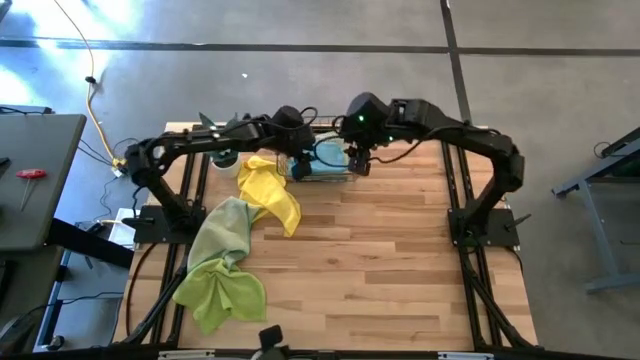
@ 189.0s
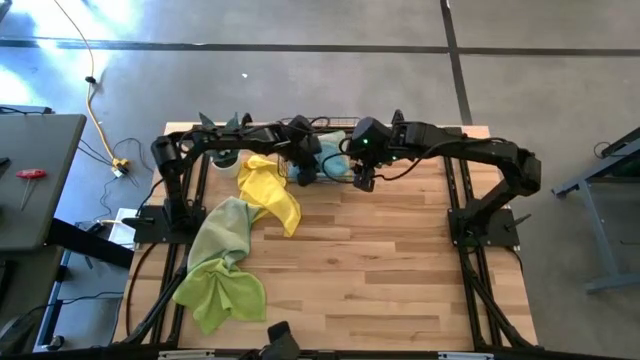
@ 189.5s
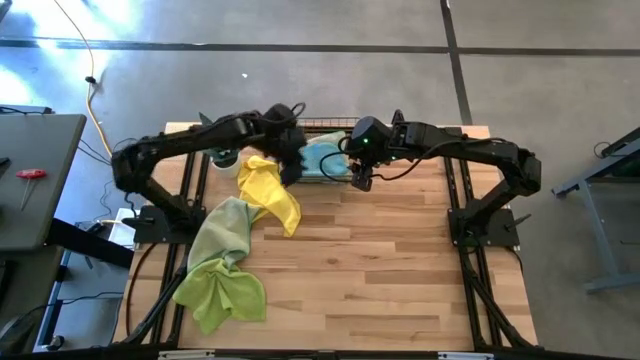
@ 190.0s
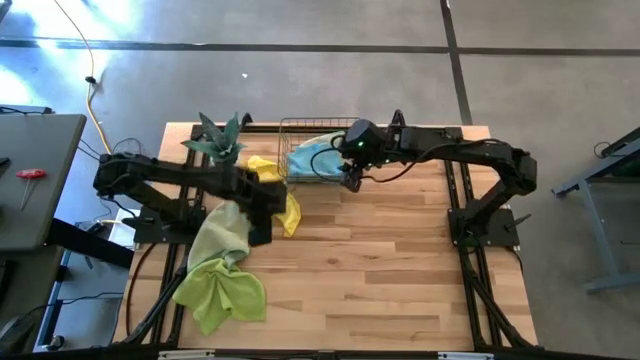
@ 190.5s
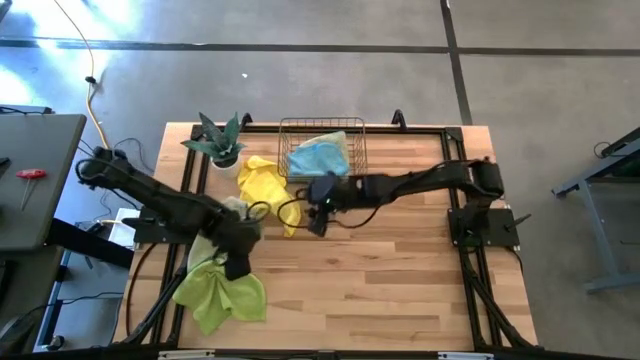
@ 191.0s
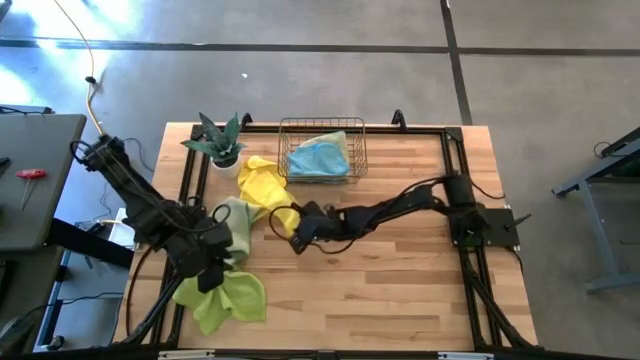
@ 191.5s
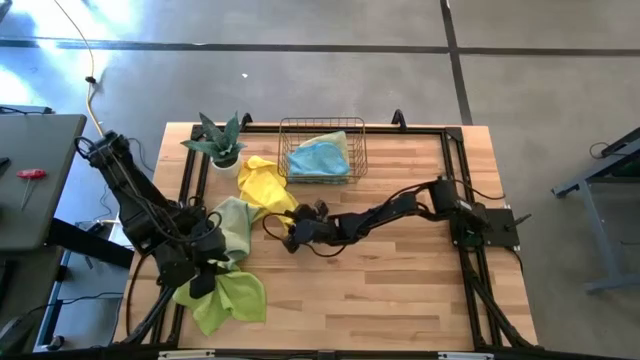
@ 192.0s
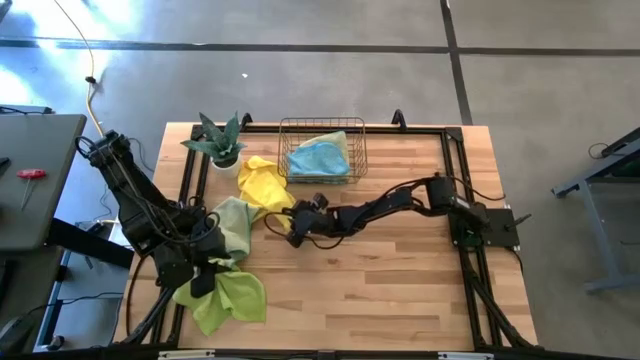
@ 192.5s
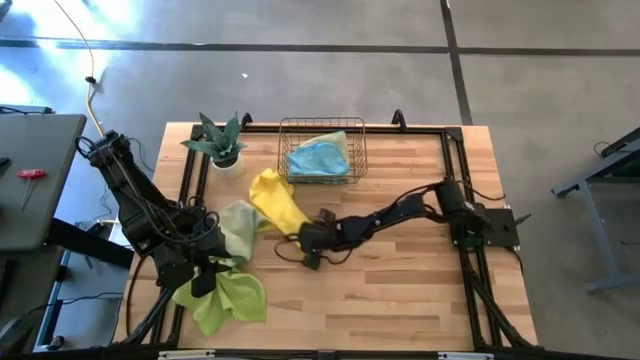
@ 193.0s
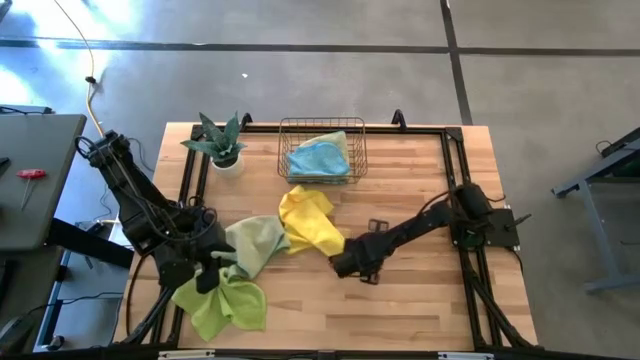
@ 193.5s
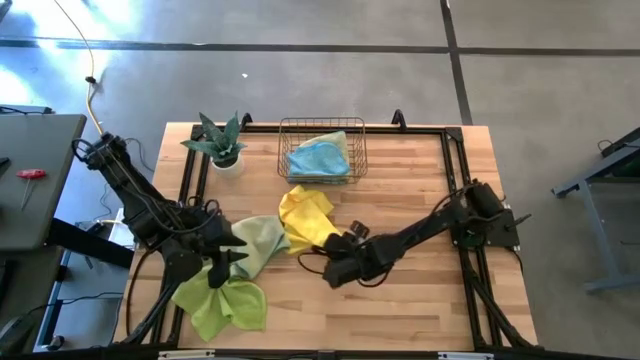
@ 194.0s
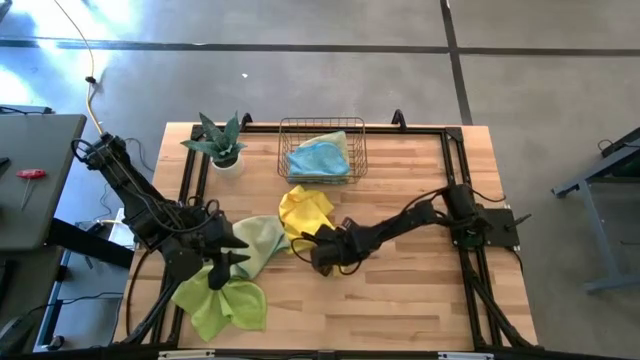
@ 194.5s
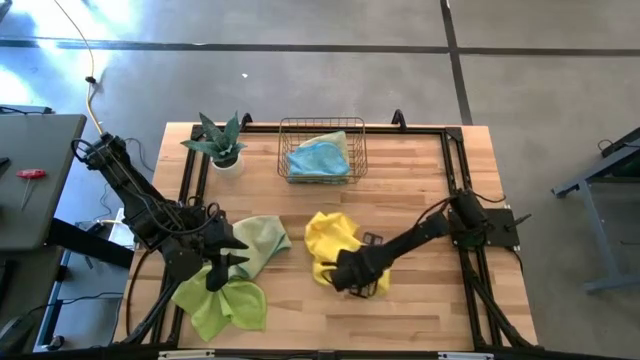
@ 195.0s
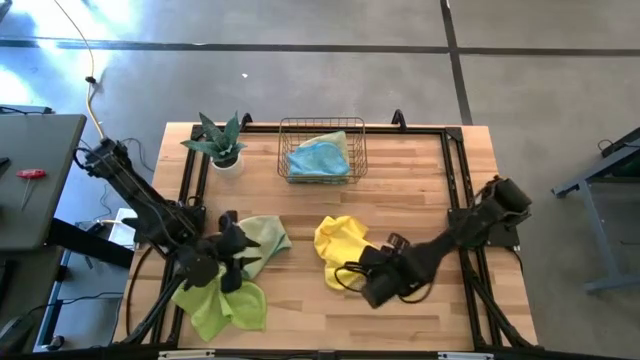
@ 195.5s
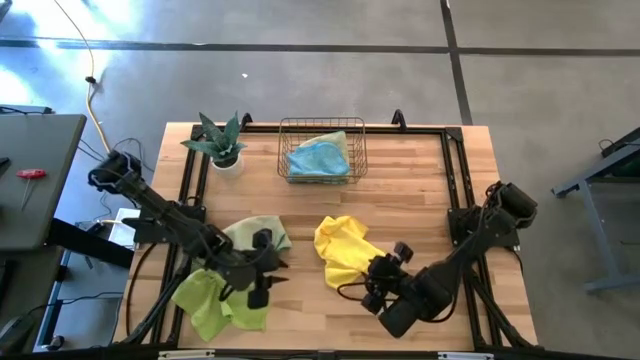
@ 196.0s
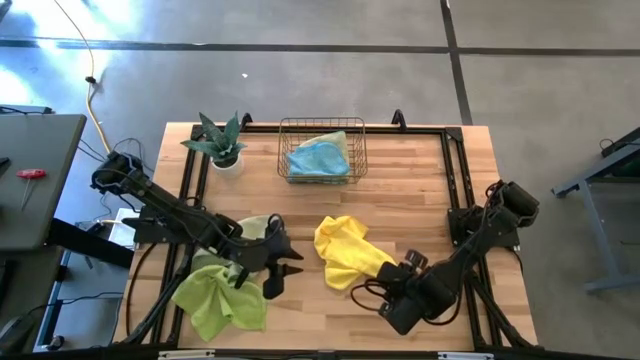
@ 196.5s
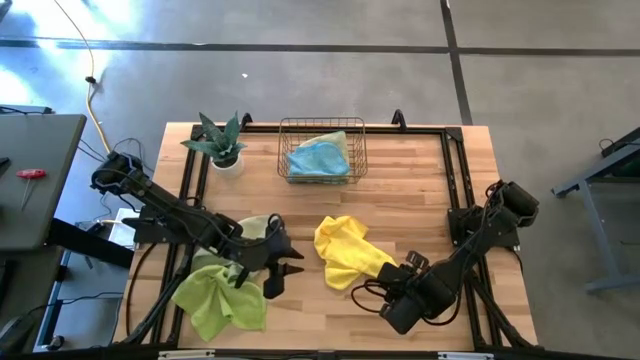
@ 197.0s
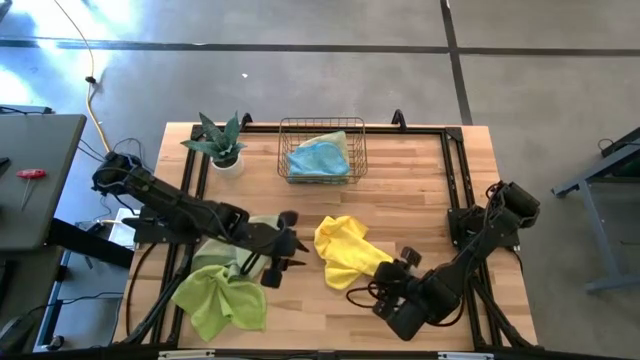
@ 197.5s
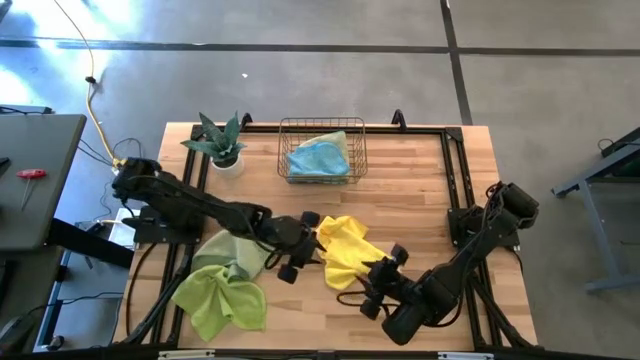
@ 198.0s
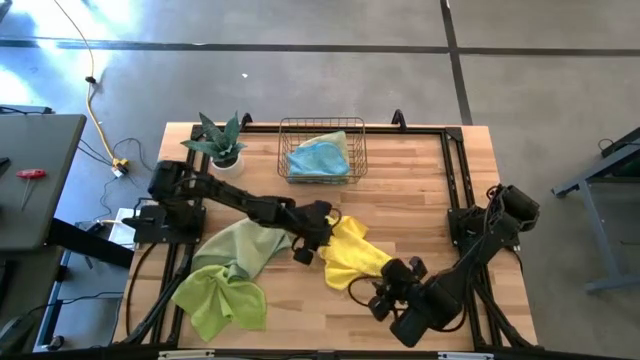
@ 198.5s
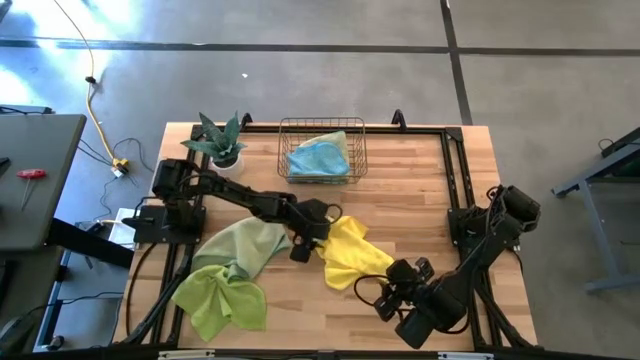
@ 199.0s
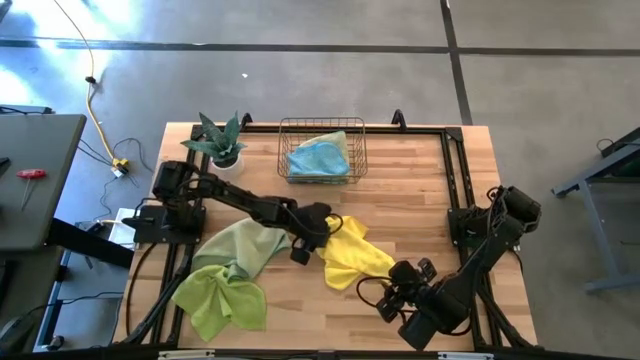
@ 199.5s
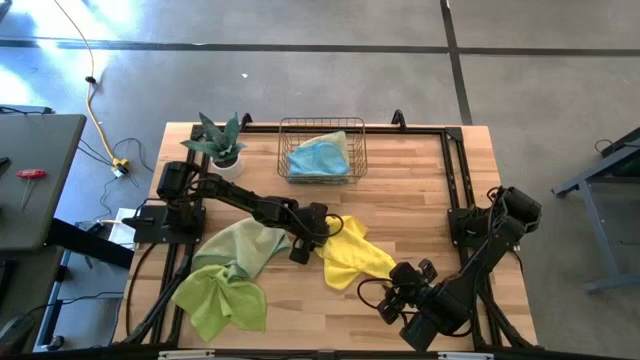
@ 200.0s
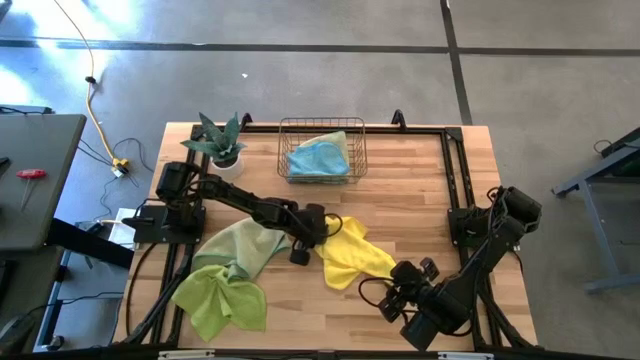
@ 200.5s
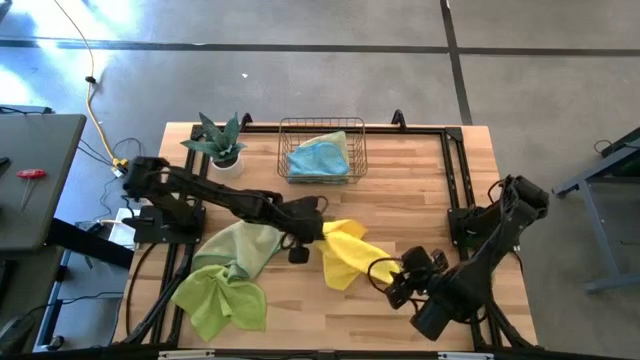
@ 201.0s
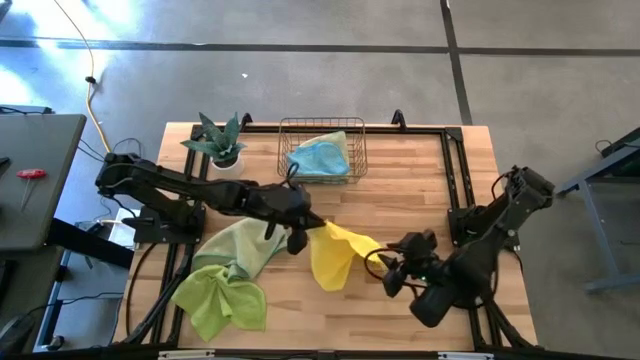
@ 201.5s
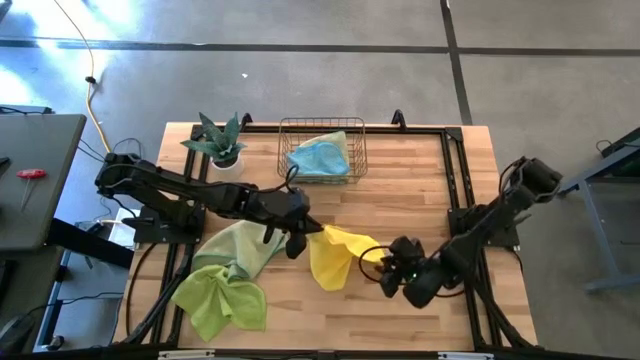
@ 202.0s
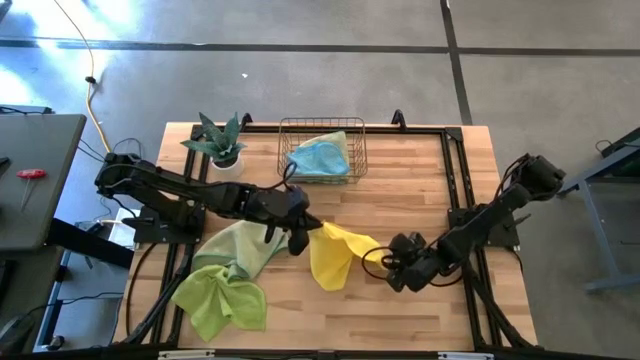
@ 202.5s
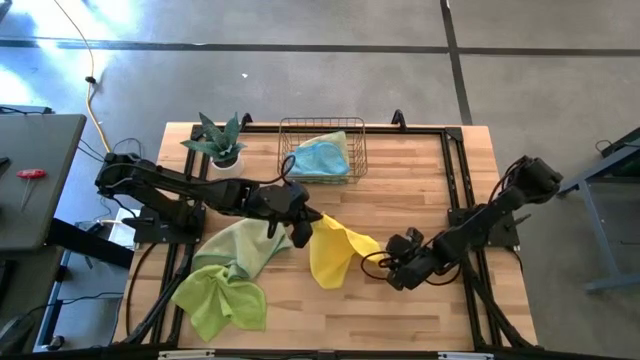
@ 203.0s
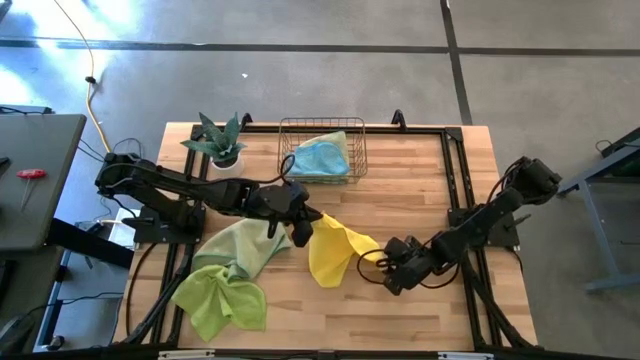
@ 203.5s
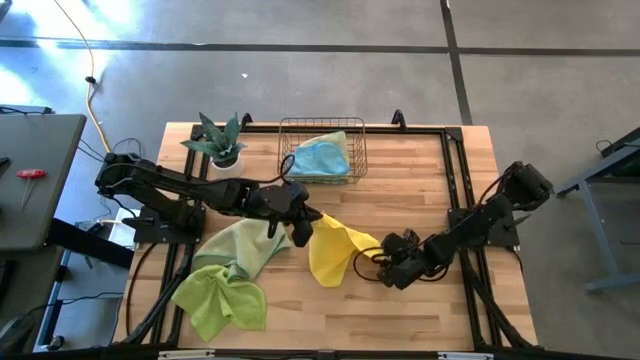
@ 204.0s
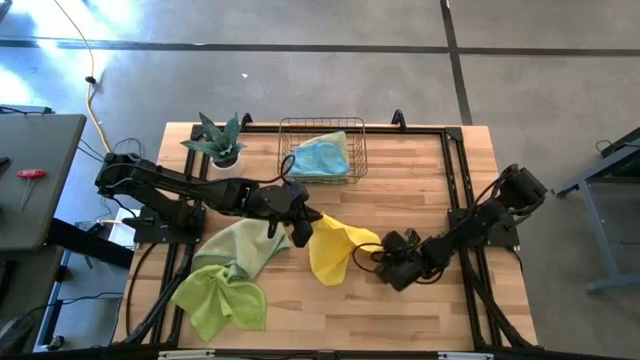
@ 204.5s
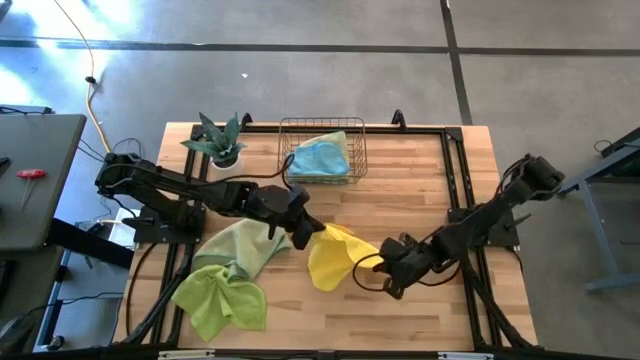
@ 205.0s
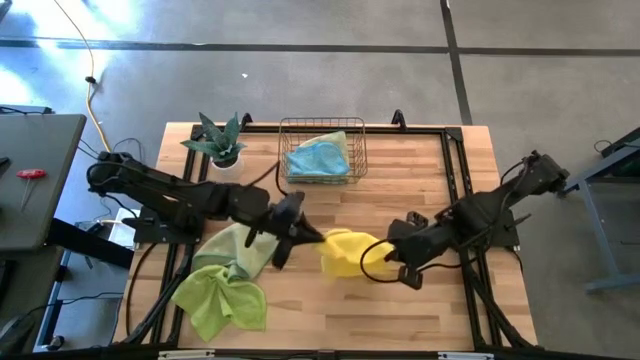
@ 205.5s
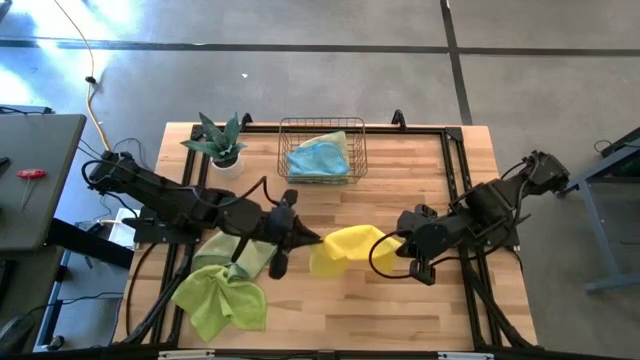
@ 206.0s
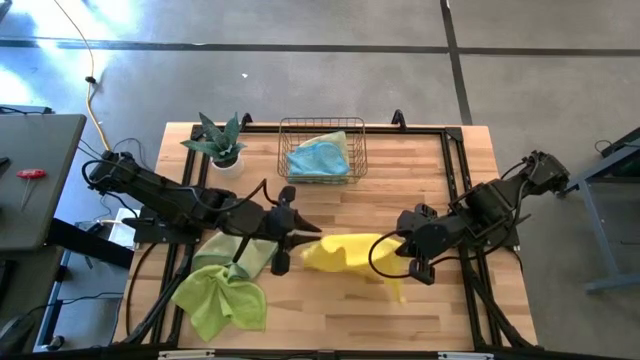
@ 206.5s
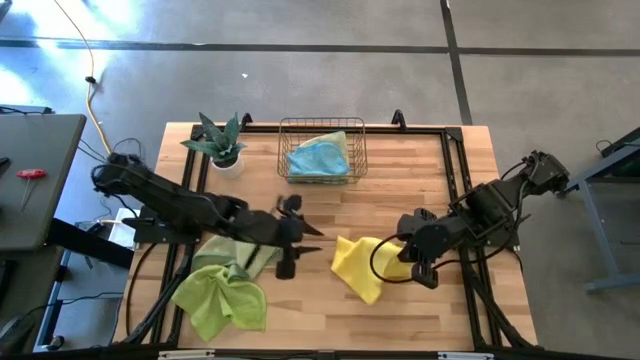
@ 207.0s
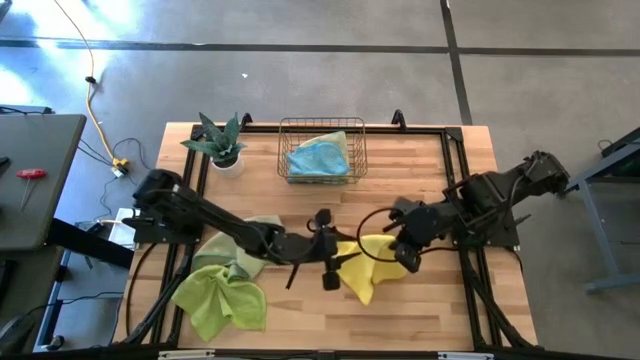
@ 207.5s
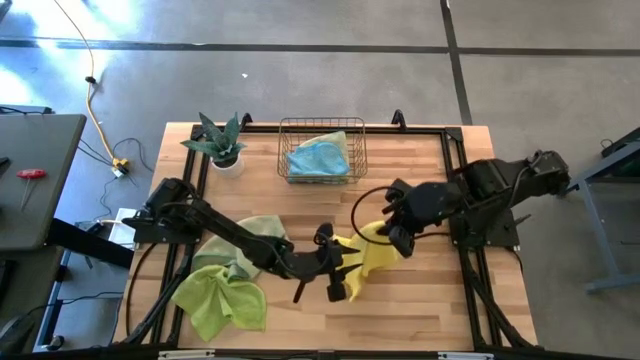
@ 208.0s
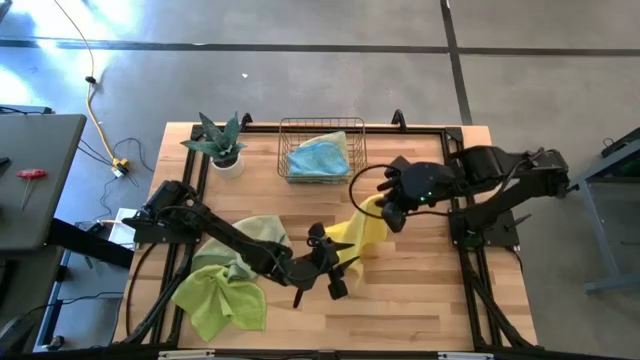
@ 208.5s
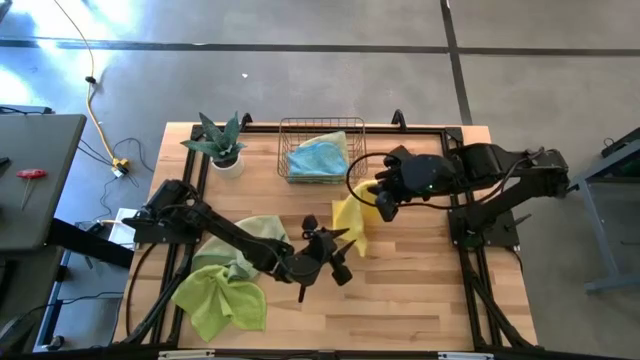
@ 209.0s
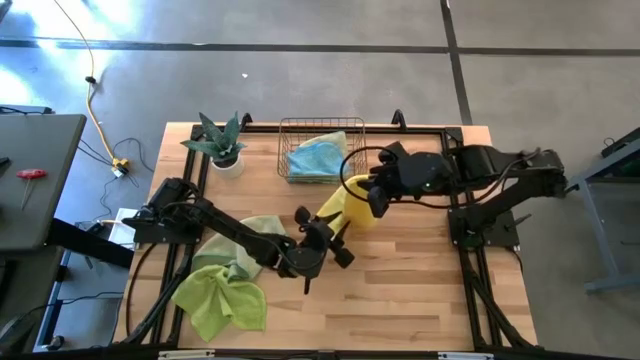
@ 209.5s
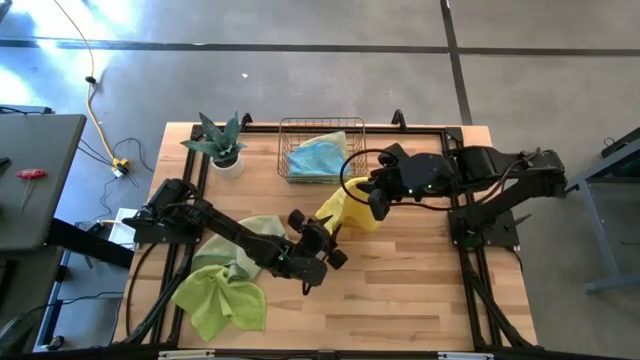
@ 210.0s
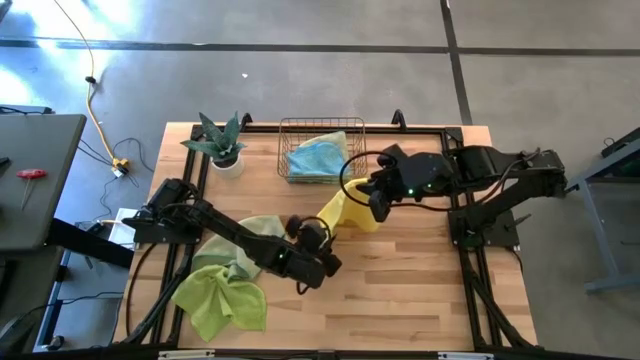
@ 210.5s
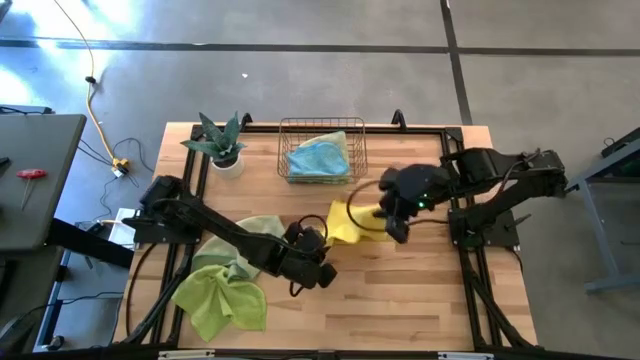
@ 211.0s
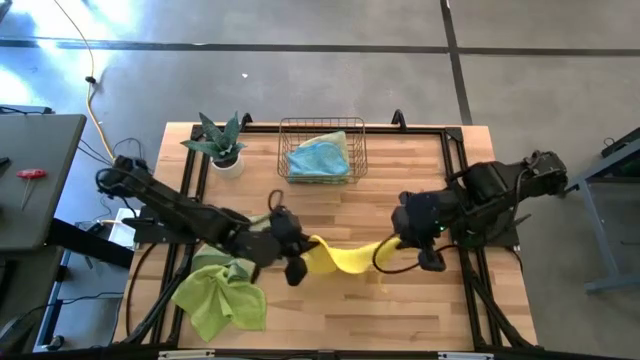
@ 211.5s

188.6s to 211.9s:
Task: Fold microfiber towels
Fold the yellow microfiber cloth
